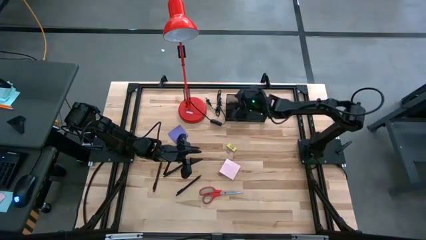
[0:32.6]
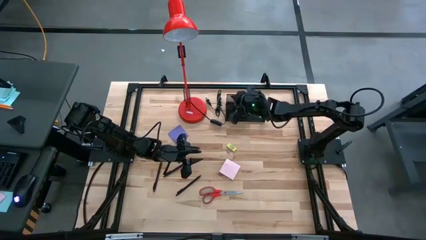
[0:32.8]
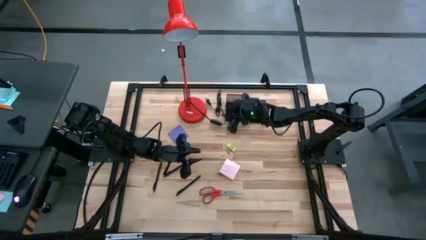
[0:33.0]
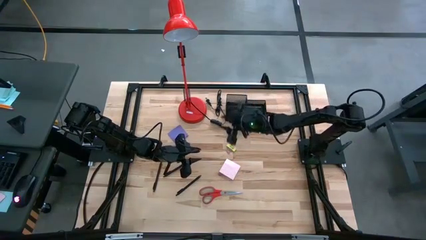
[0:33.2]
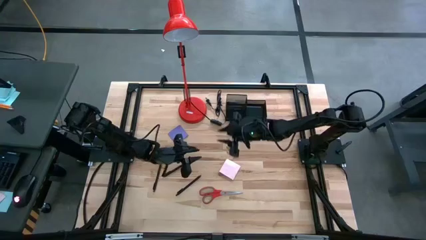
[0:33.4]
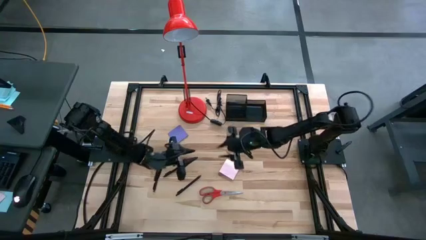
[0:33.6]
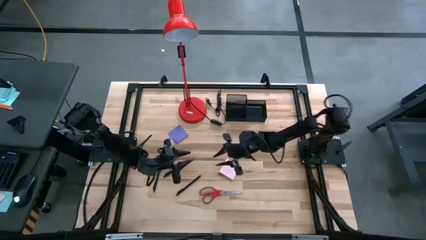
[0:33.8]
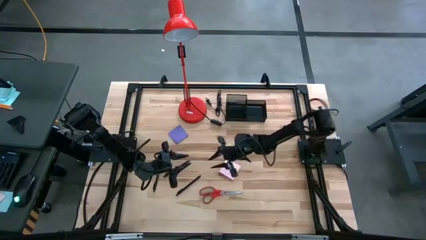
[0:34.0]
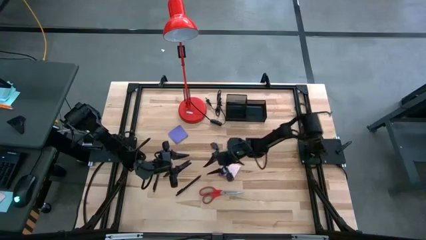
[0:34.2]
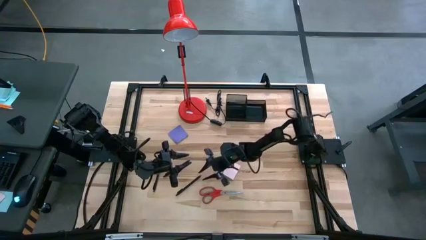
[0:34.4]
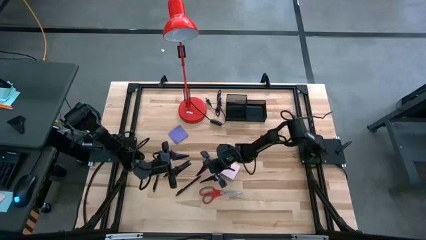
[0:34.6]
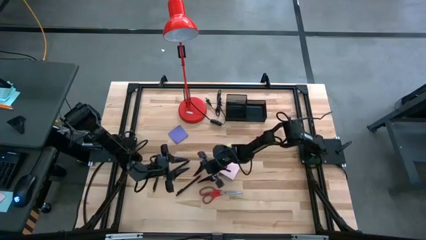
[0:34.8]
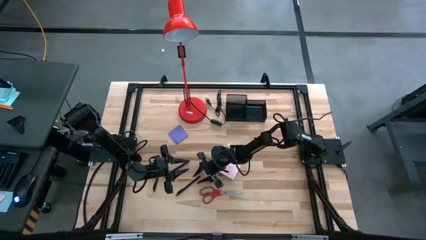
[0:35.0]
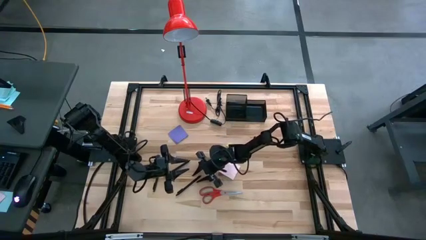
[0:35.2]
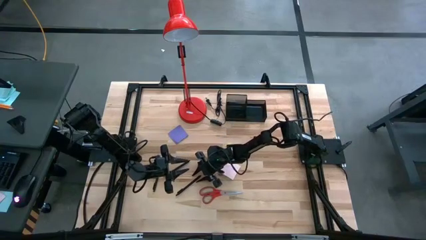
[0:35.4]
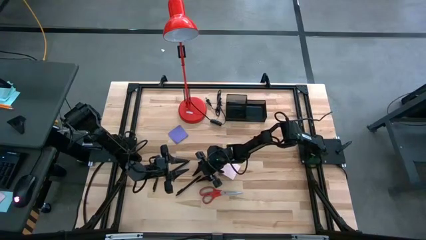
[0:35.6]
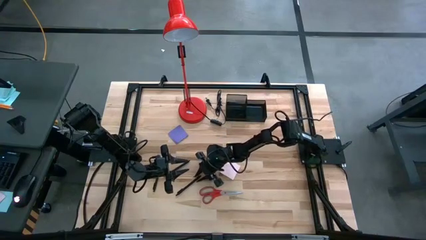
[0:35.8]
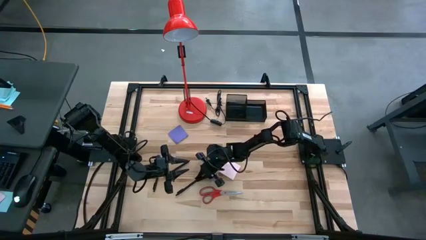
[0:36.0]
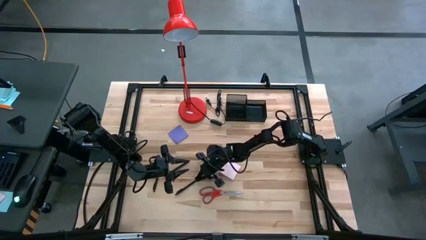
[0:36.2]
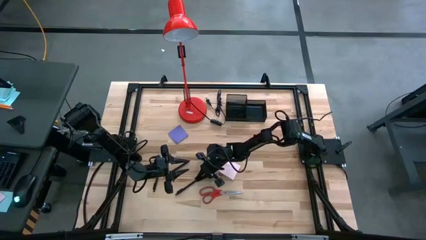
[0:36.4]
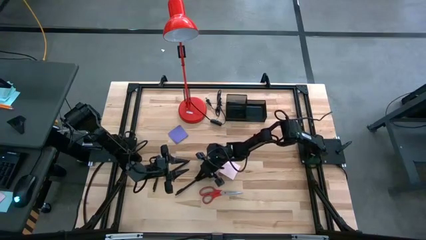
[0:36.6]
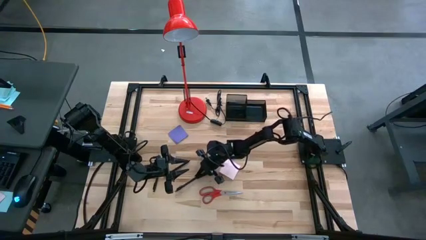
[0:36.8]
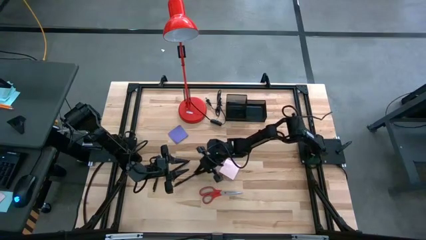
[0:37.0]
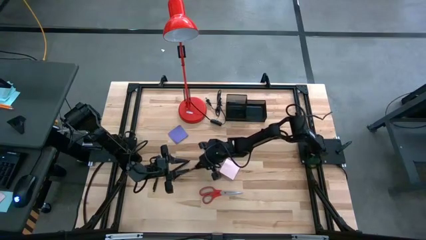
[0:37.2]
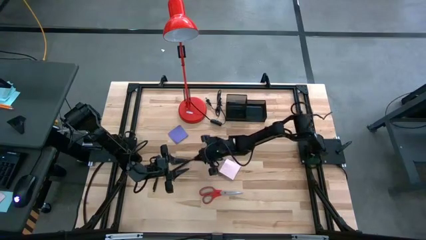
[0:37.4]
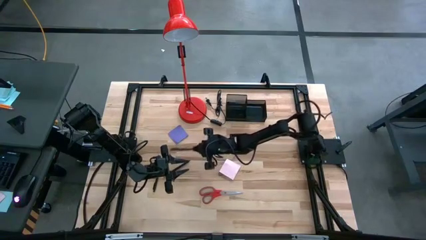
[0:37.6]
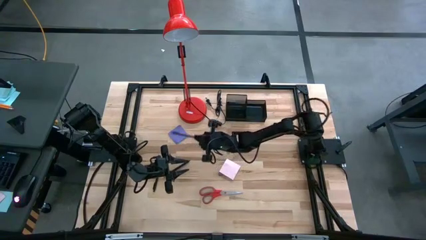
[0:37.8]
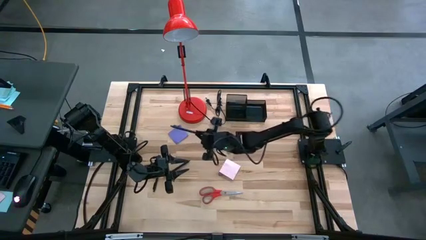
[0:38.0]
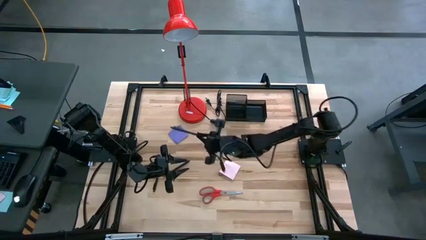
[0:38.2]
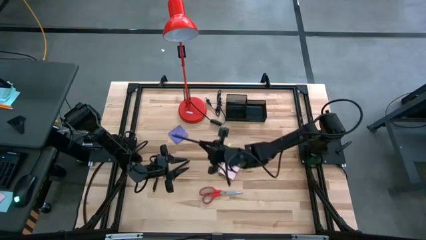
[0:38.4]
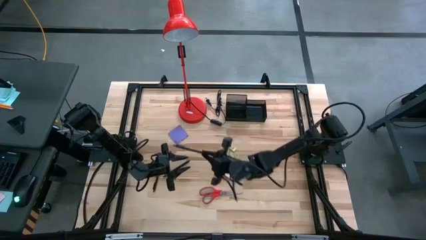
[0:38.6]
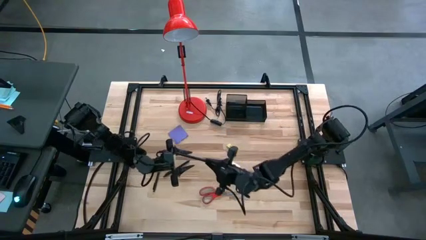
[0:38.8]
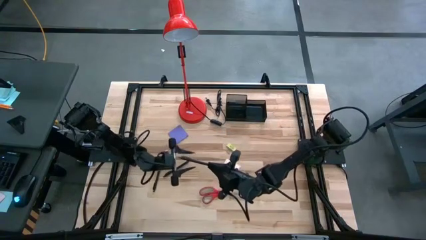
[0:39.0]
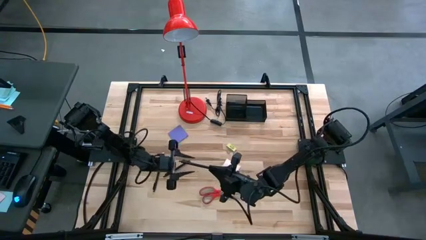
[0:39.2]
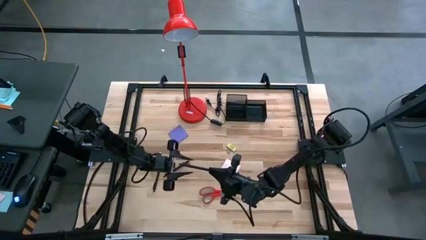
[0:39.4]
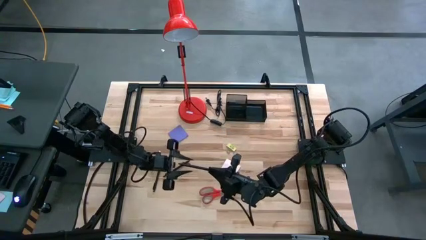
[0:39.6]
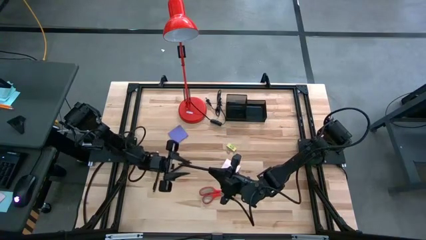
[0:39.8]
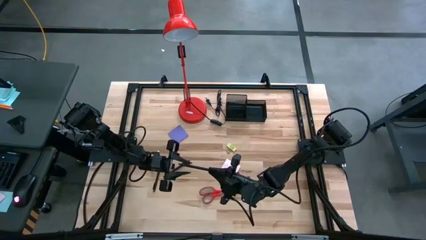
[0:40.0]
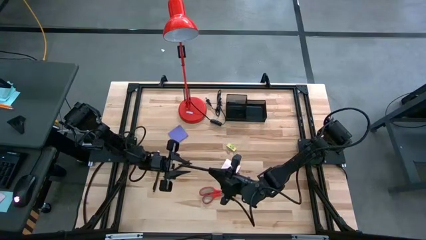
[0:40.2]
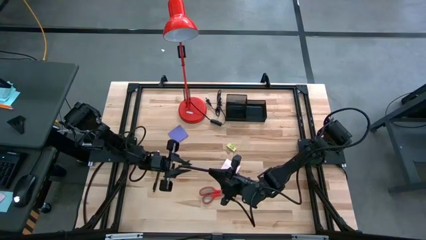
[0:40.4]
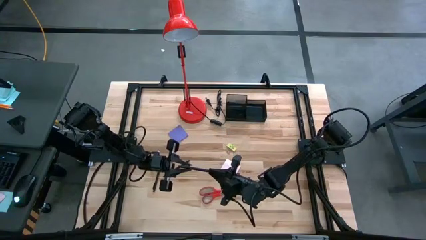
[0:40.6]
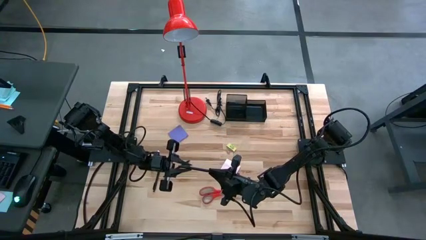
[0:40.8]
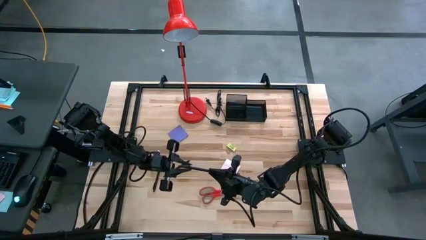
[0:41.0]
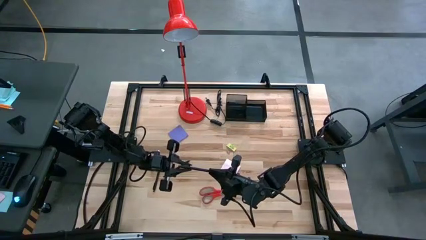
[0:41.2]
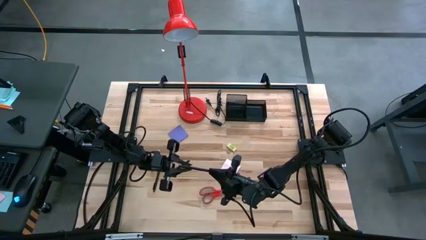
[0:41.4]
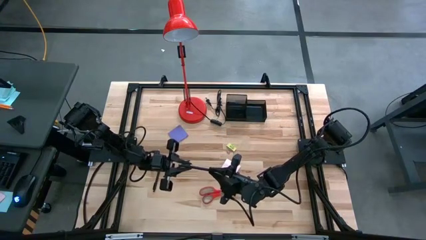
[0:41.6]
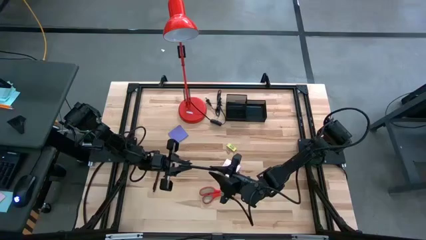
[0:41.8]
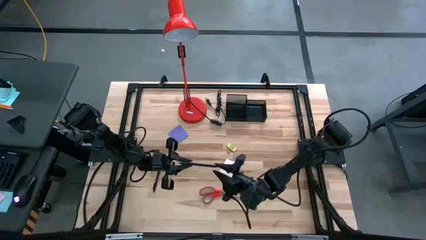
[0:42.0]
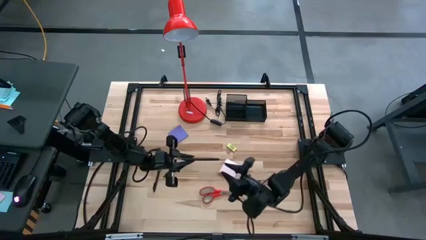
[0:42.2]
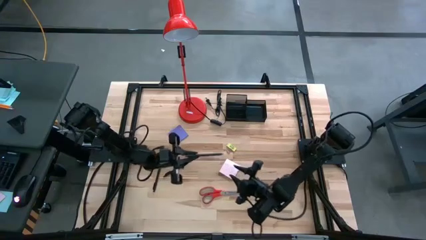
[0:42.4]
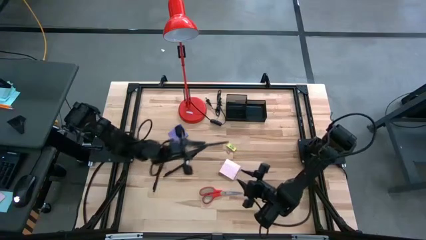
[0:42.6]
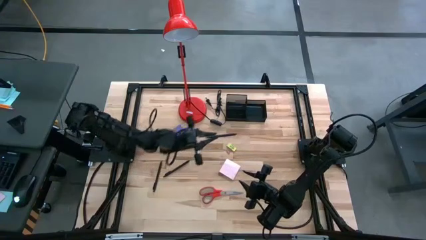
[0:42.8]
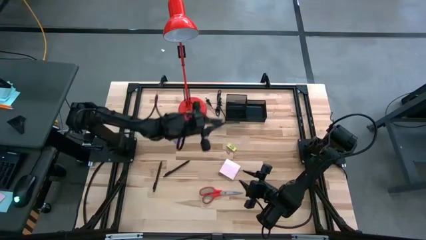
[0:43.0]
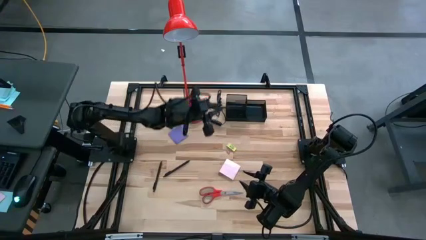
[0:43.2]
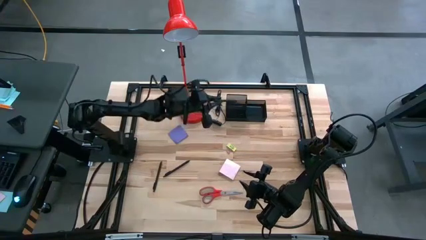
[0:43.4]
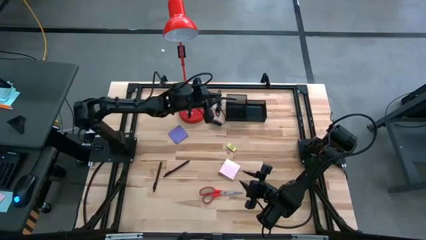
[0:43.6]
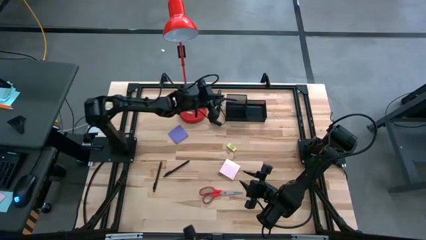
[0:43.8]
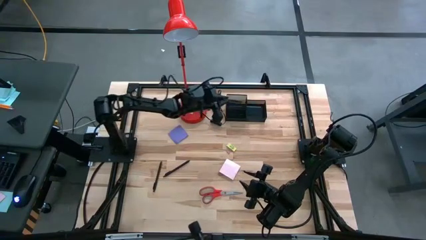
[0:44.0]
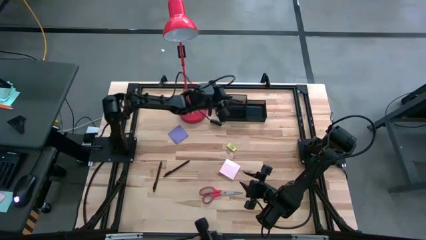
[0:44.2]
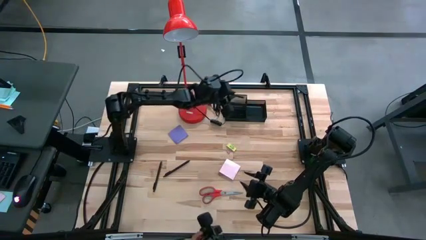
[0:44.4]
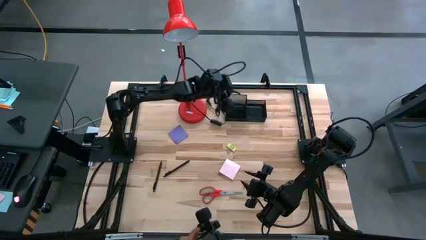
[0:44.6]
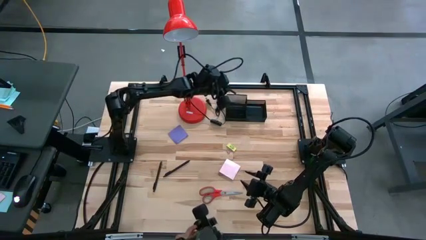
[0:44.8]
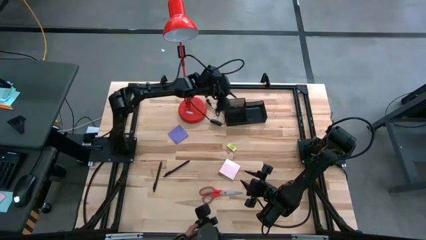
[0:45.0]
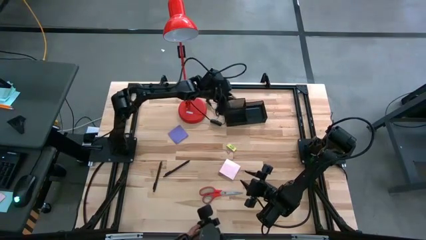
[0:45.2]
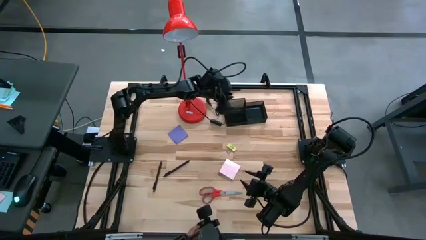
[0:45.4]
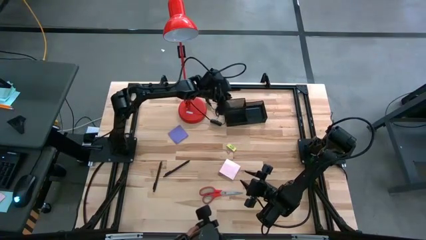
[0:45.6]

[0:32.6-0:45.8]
Task: Pick and place office supplies into organizer
Put the black pen into the black desk organizer
